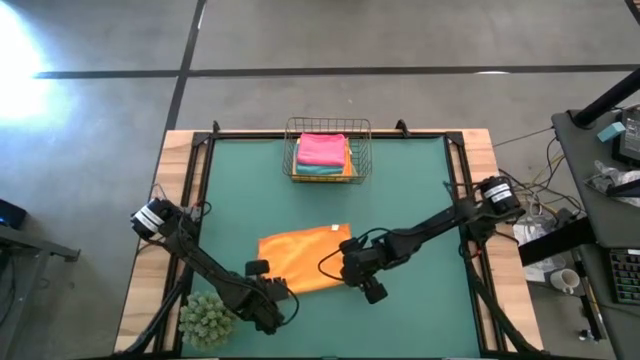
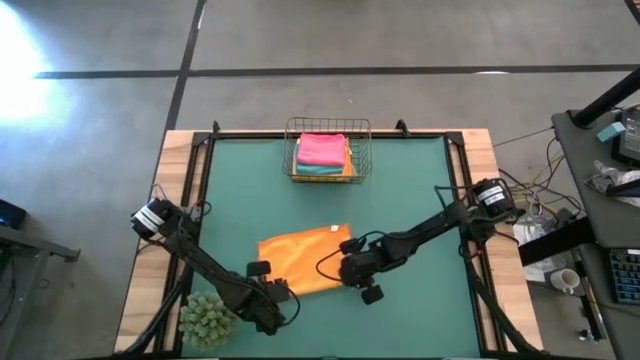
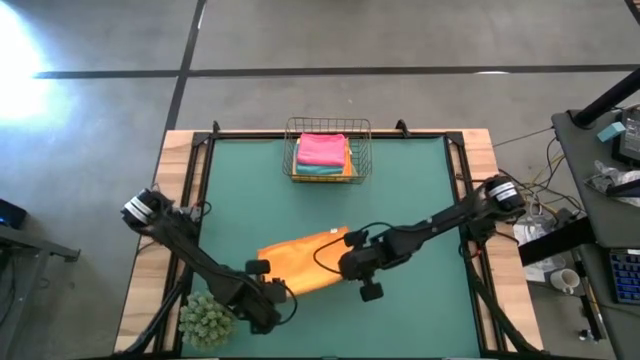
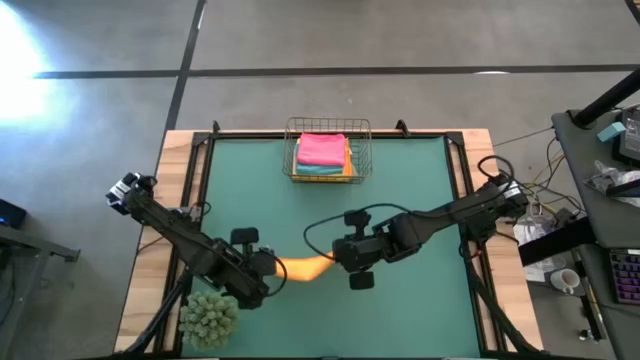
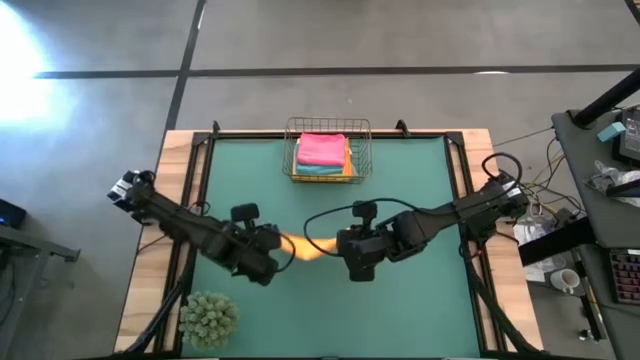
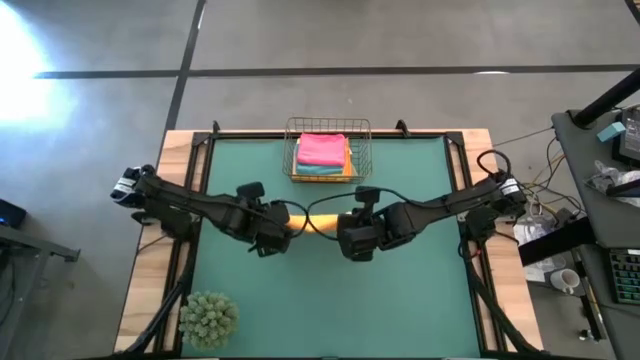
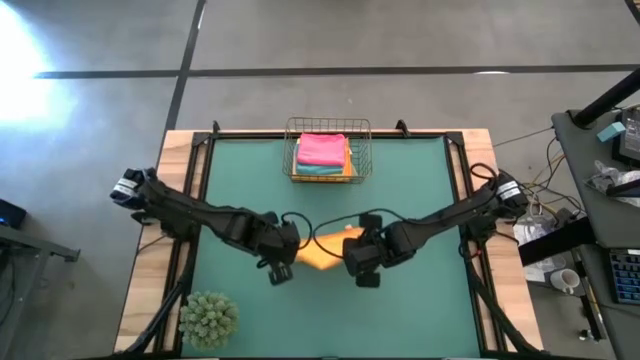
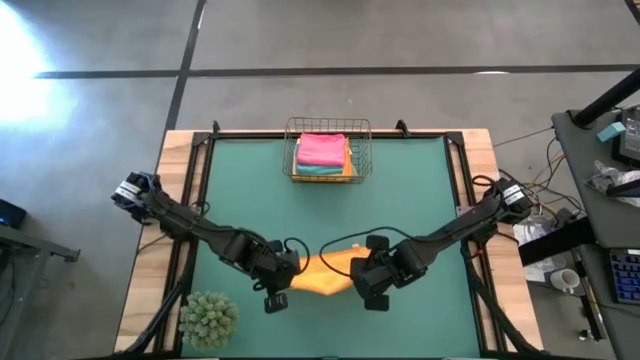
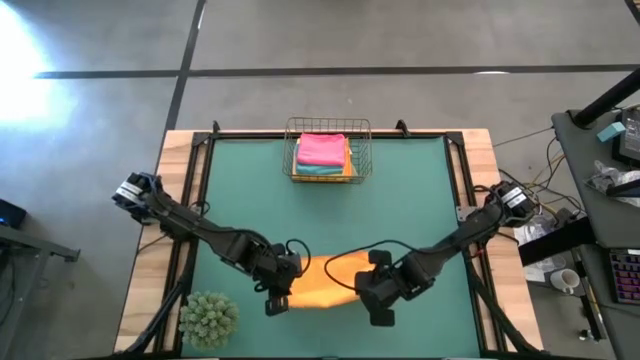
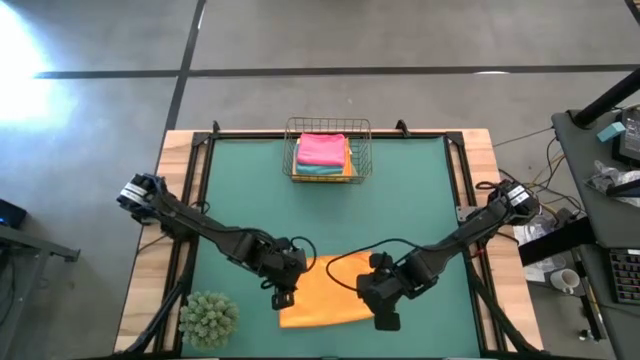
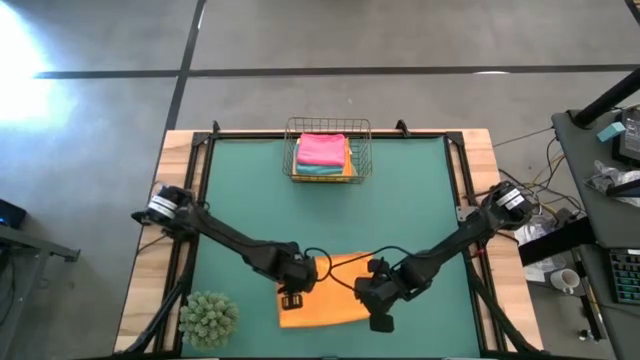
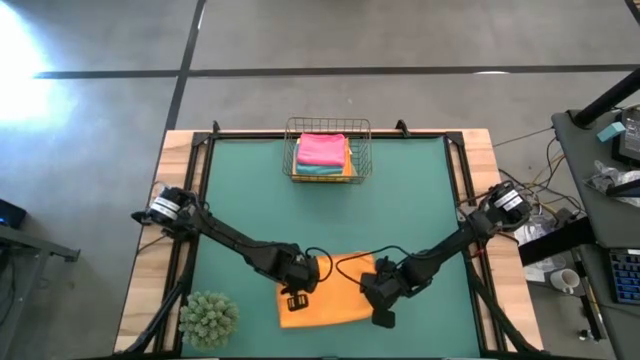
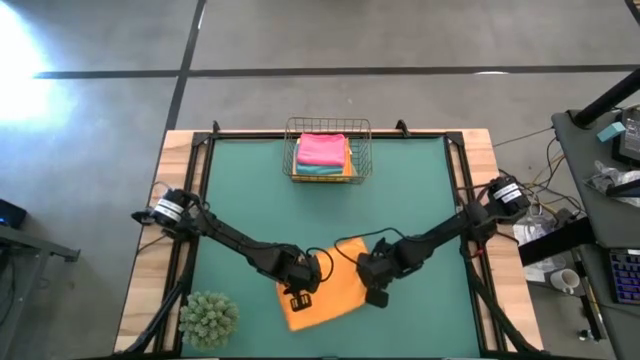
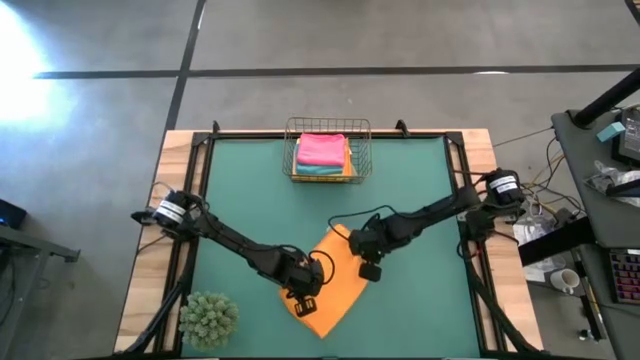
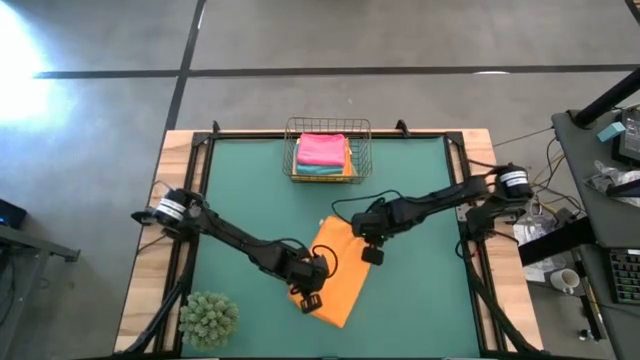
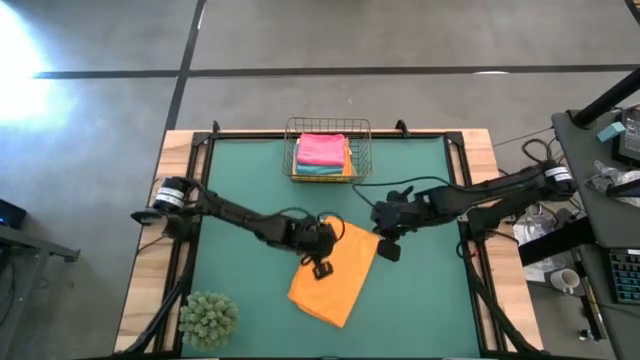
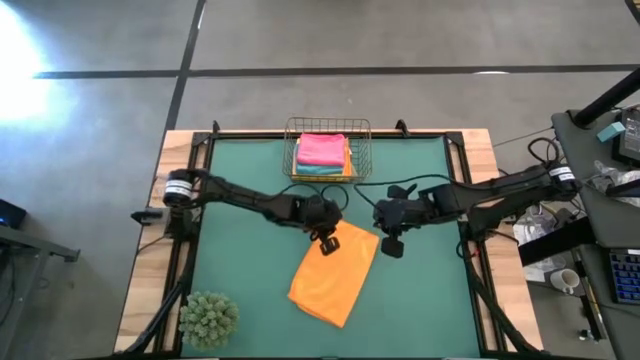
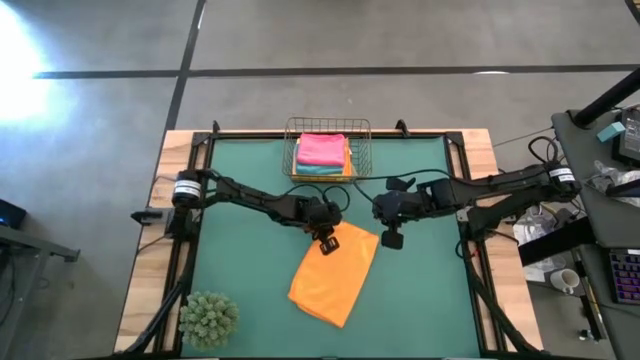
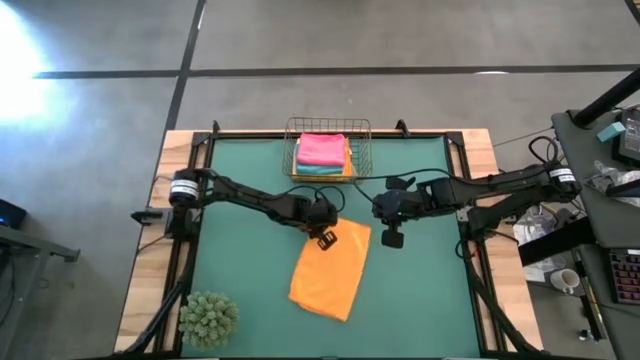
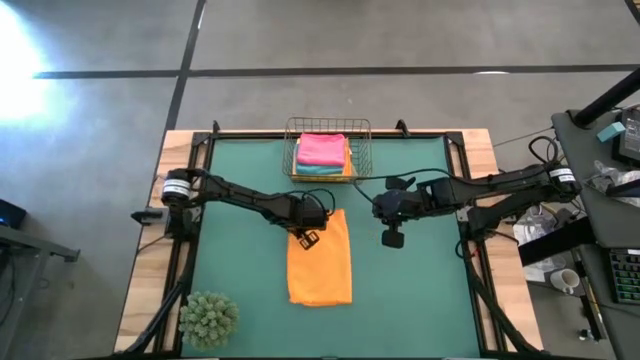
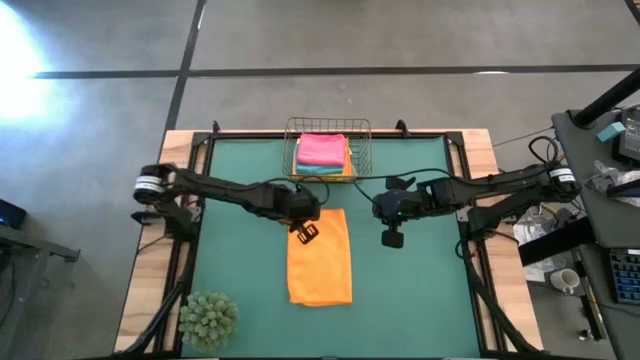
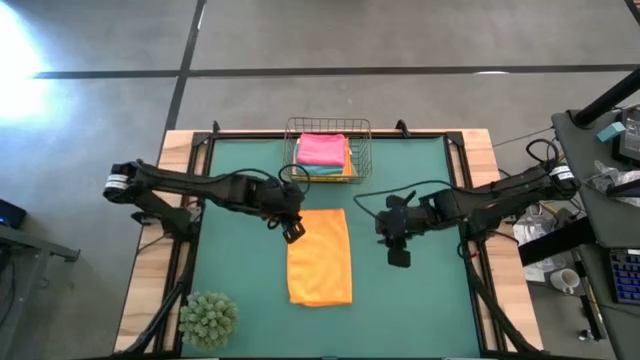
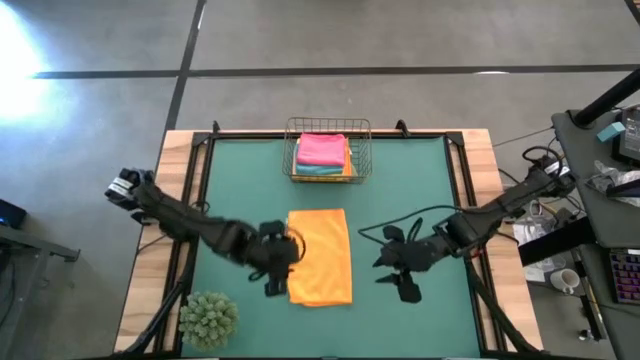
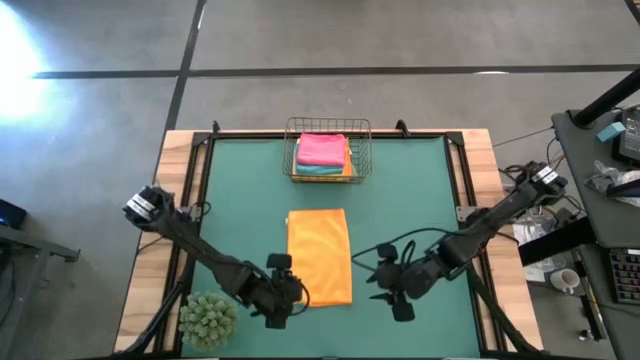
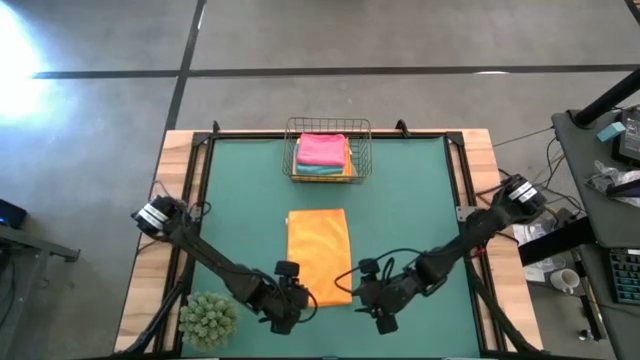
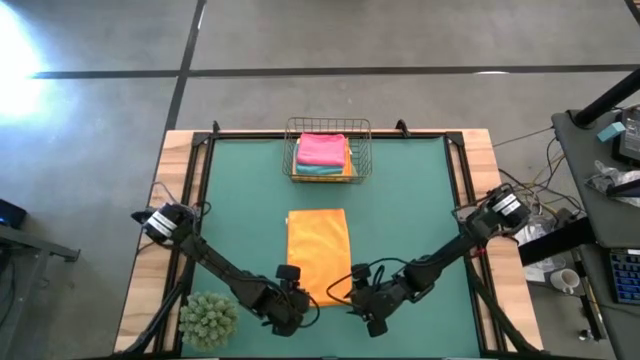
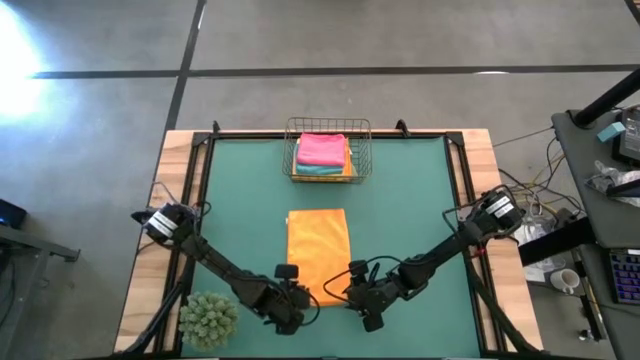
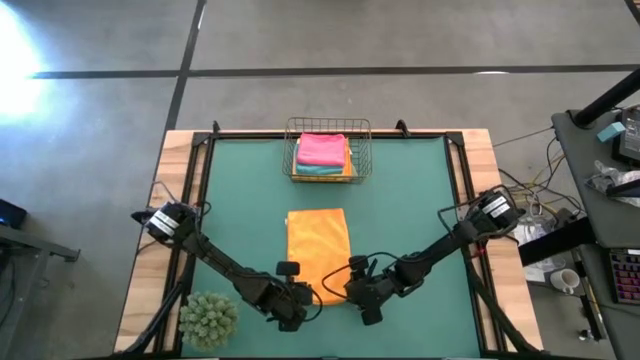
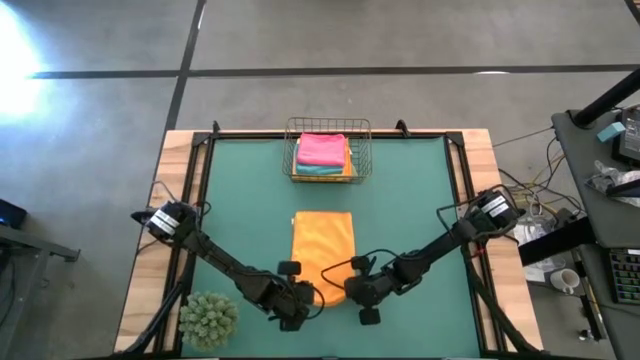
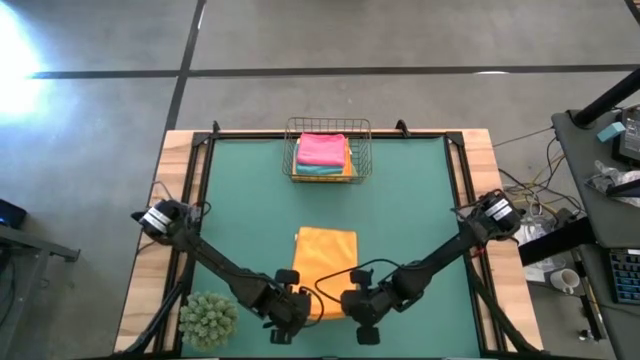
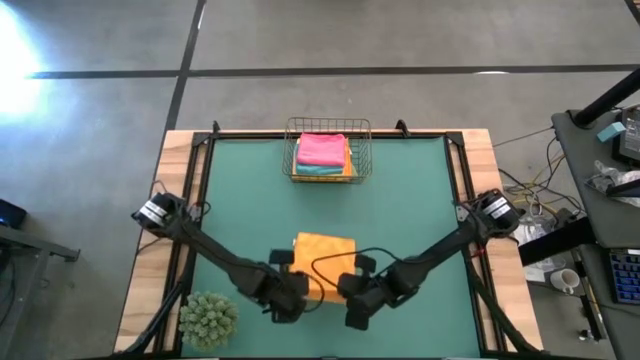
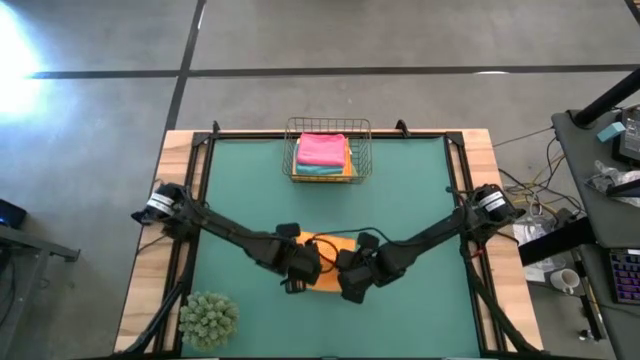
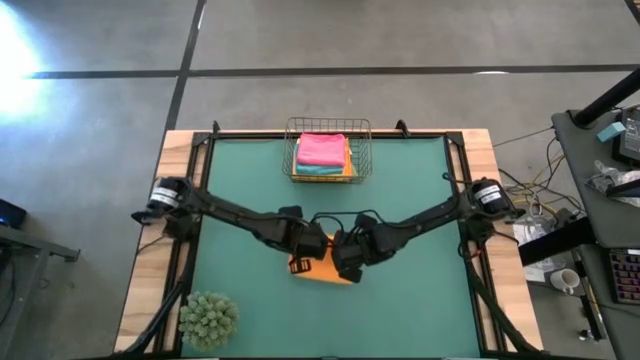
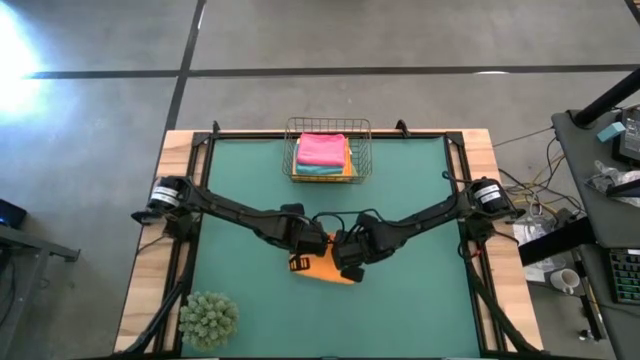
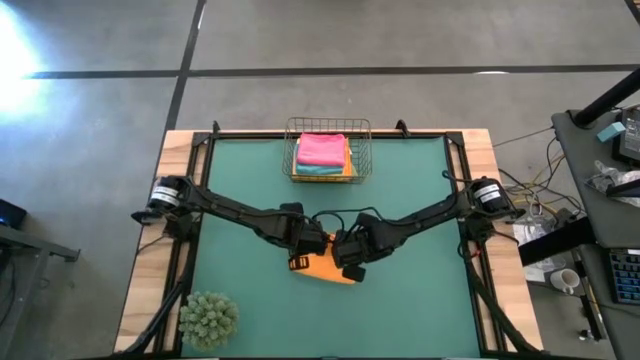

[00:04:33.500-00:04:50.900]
Task: Fold microfiber towels
Fold the yellow microfiber cloth
